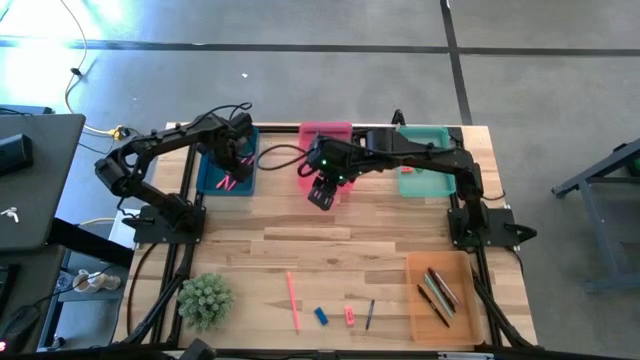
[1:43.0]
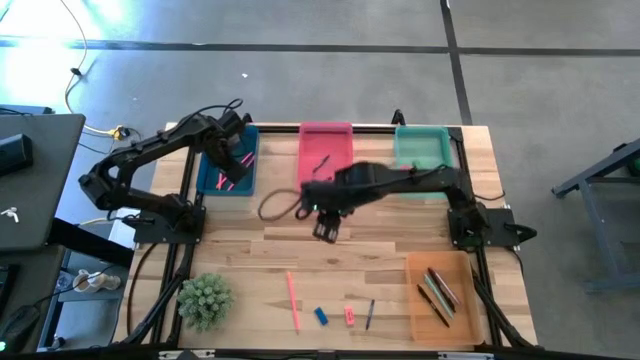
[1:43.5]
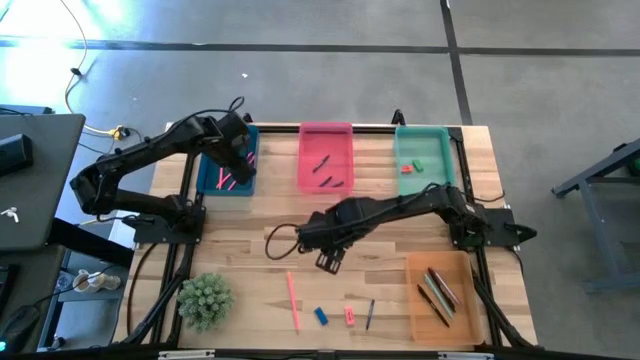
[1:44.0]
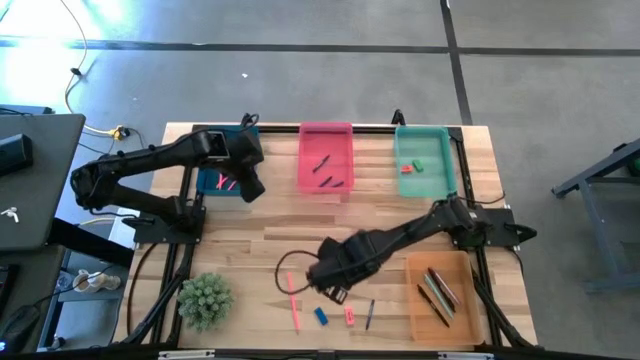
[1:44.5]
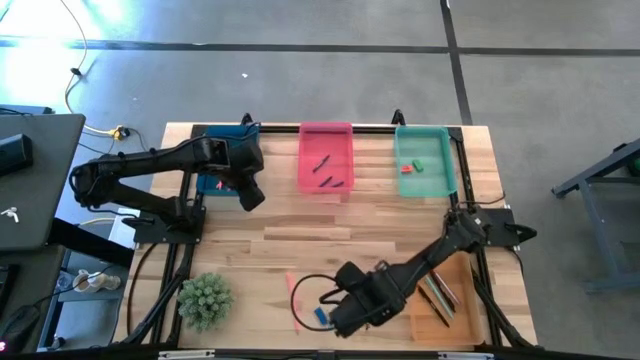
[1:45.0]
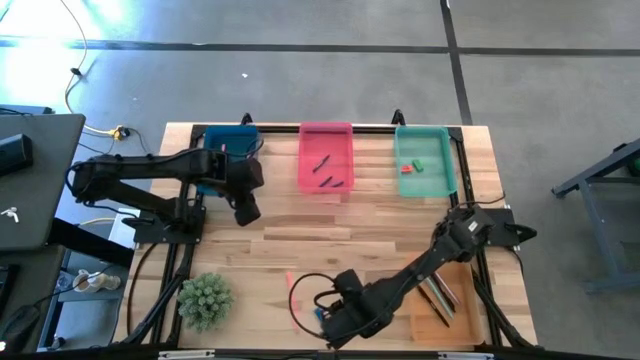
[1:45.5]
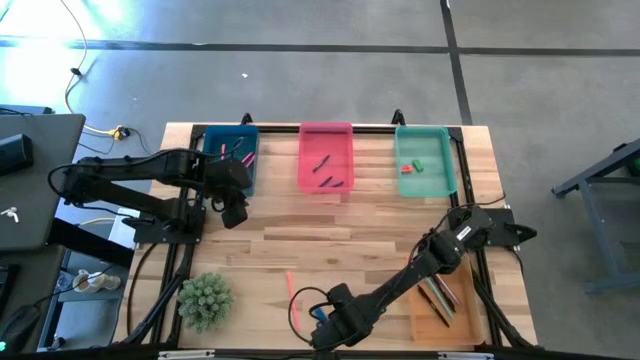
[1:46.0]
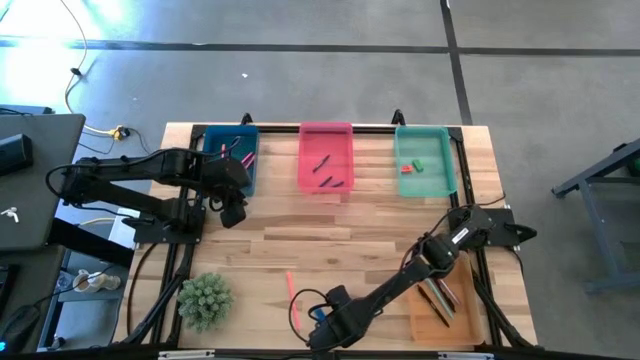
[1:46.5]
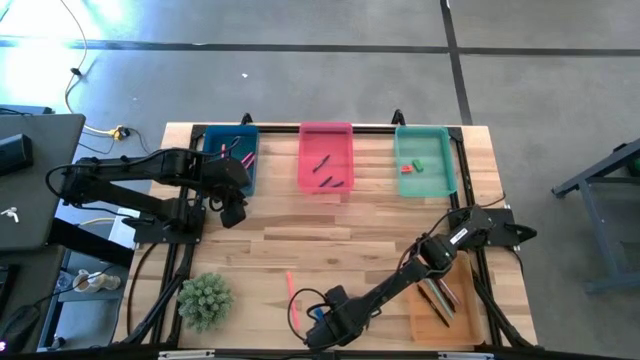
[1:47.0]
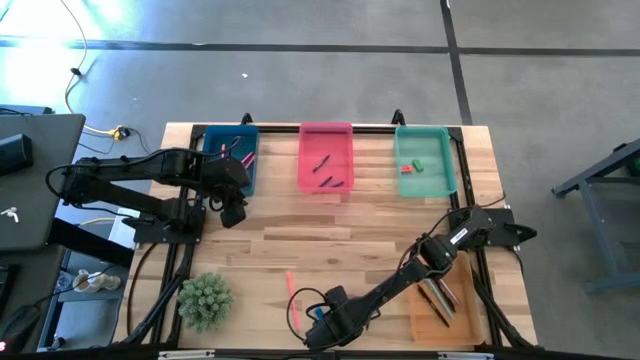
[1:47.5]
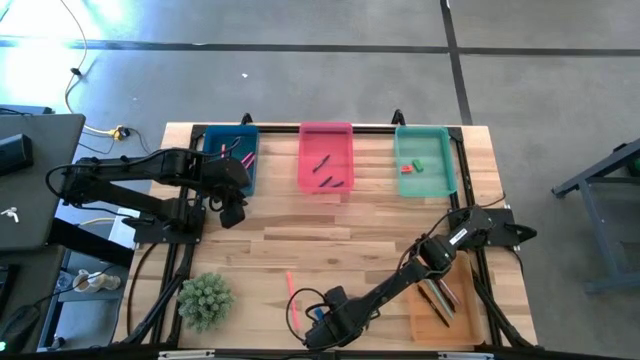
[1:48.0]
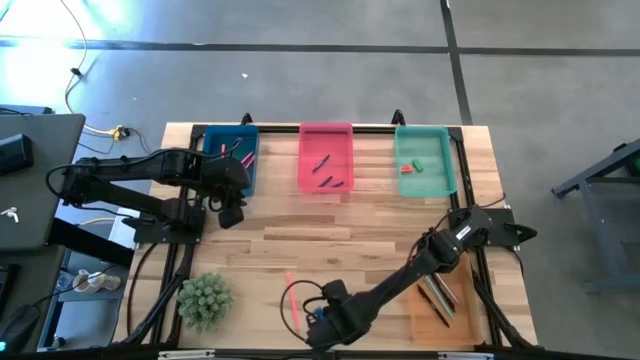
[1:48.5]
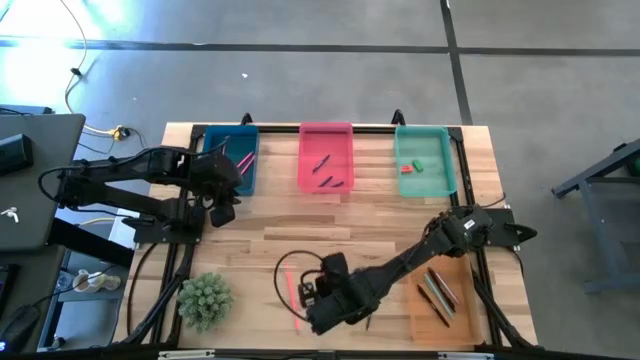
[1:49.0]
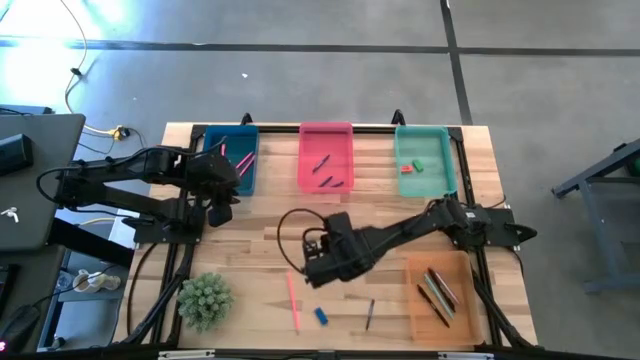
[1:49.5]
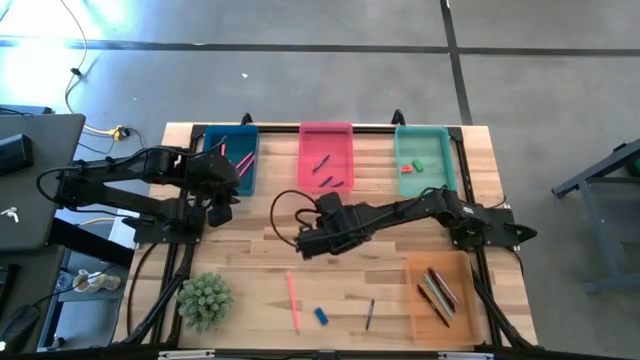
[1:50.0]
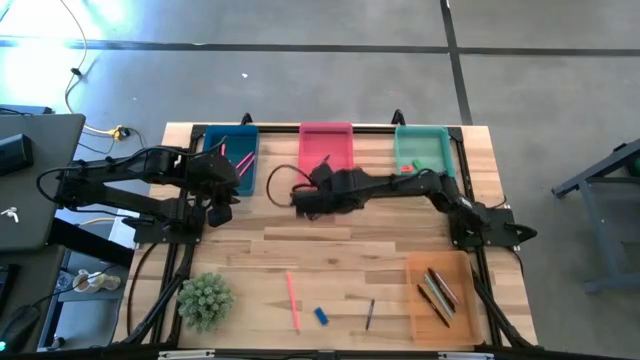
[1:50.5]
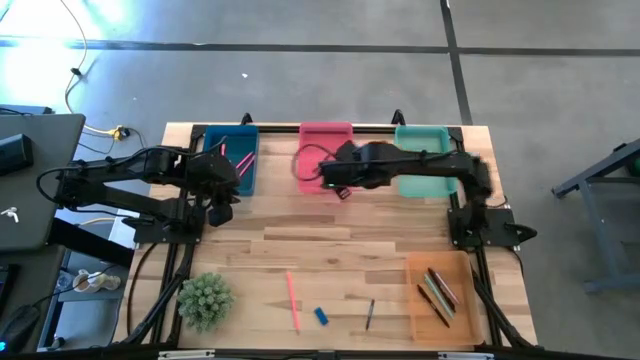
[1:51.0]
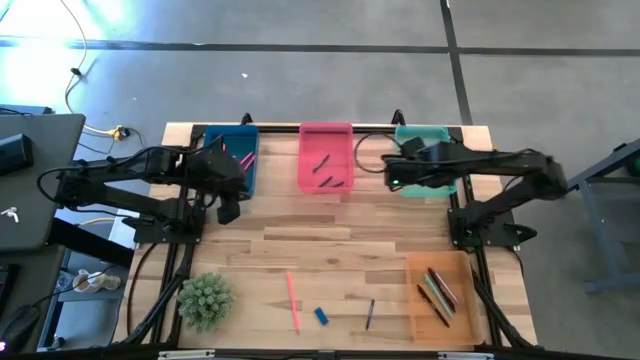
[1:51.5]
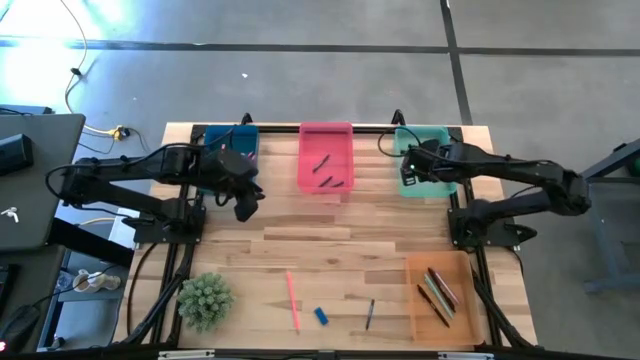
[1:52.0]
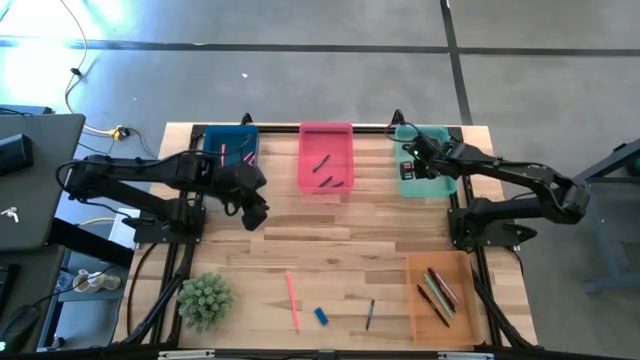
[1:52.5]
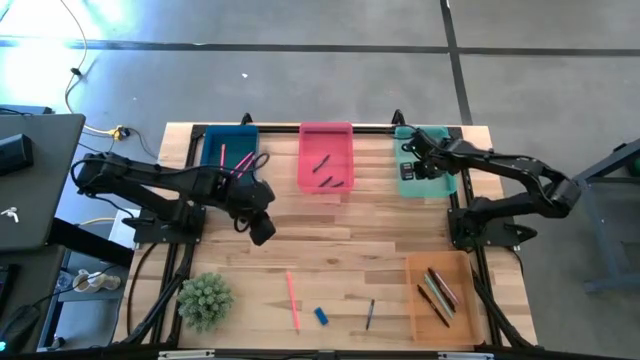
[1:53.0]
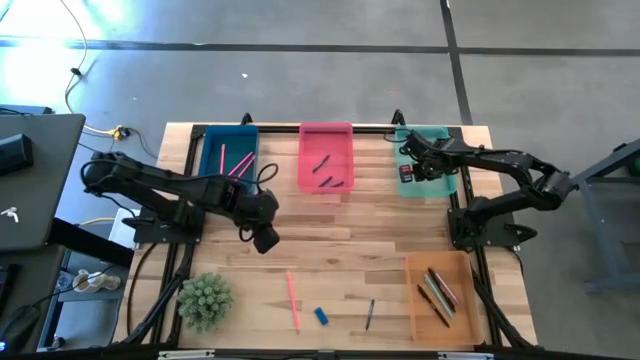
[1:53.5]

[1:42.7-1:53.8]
Task: Sort crayons/erasers/pens/pencils in bins
Put the pink eraser into the green bin

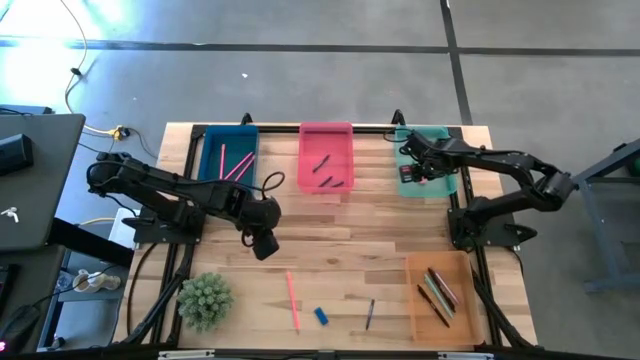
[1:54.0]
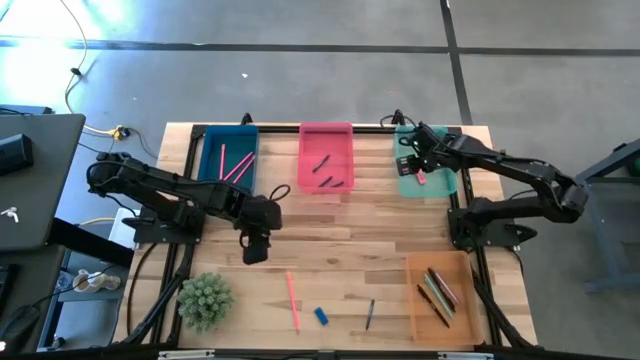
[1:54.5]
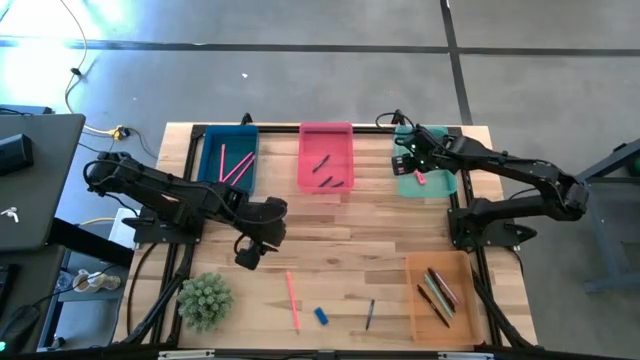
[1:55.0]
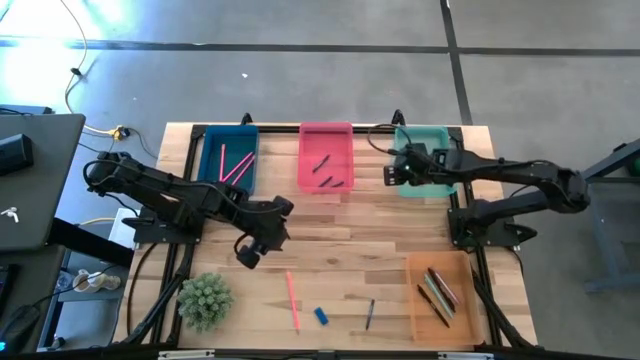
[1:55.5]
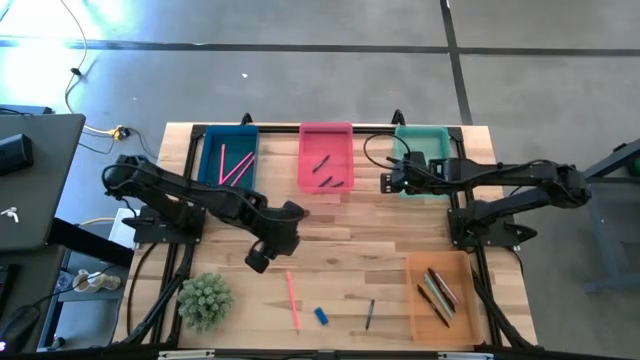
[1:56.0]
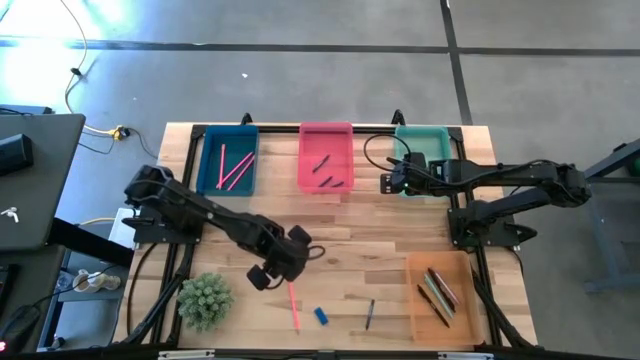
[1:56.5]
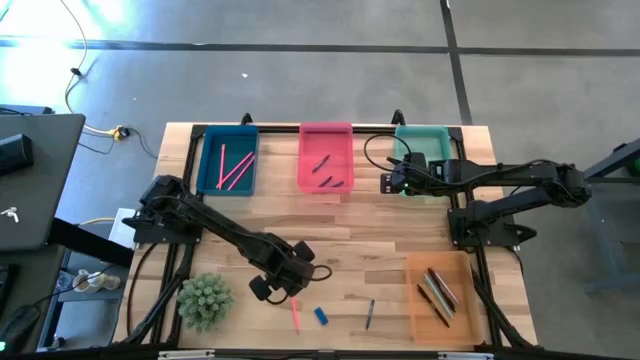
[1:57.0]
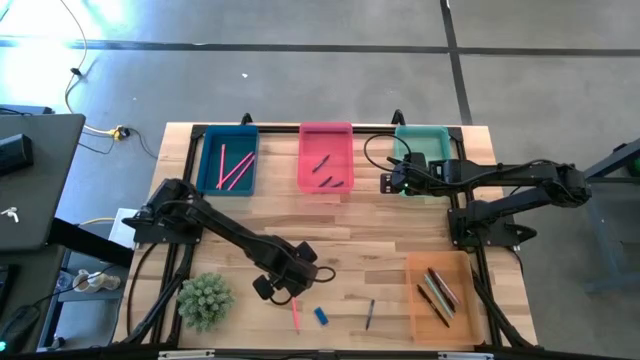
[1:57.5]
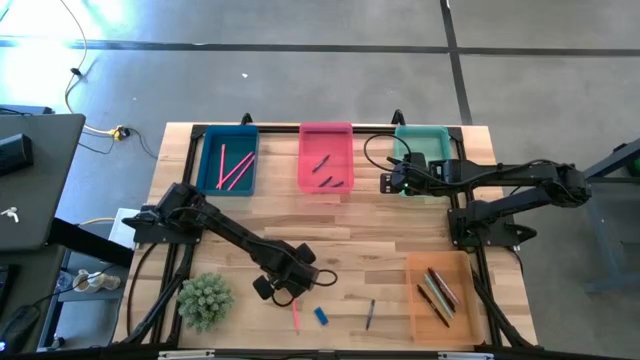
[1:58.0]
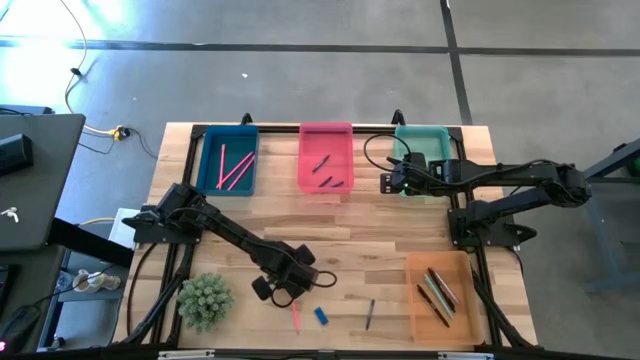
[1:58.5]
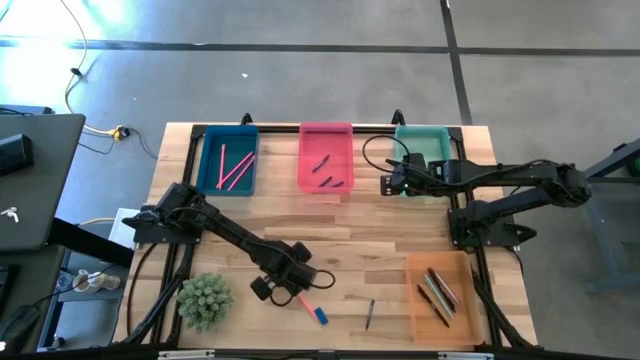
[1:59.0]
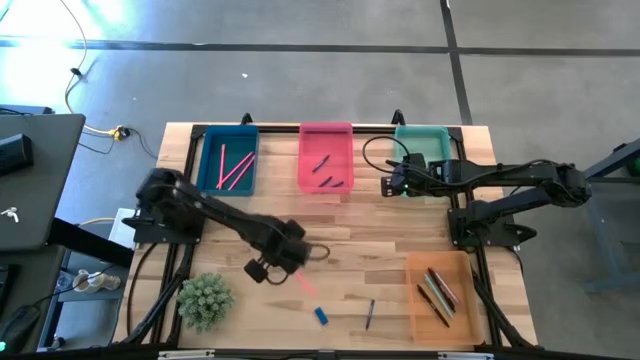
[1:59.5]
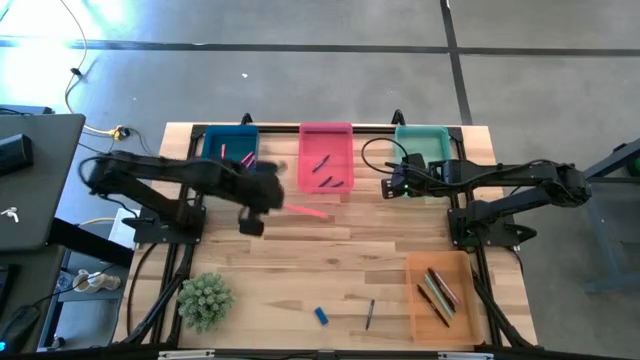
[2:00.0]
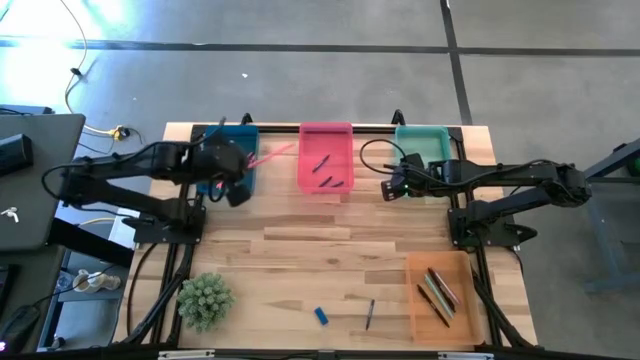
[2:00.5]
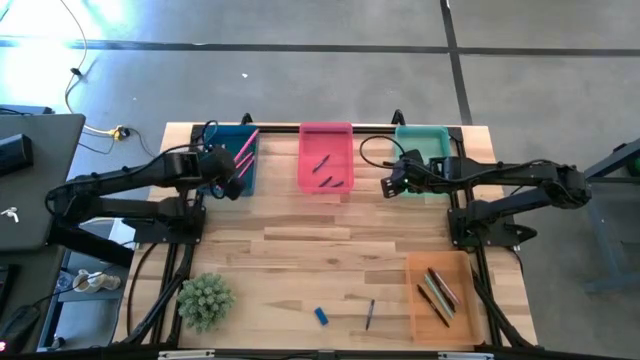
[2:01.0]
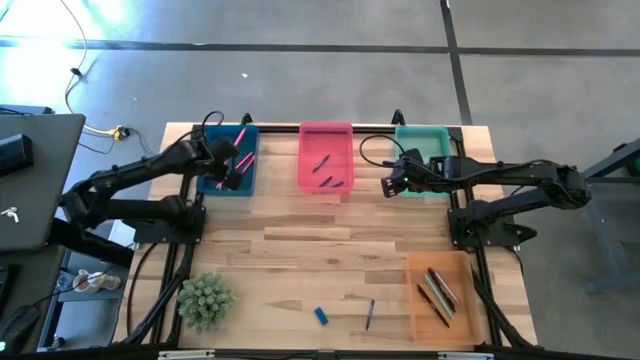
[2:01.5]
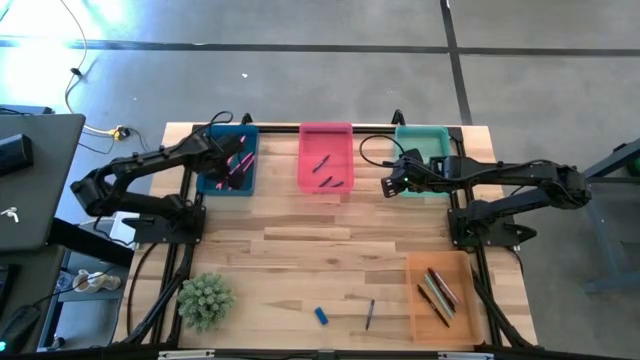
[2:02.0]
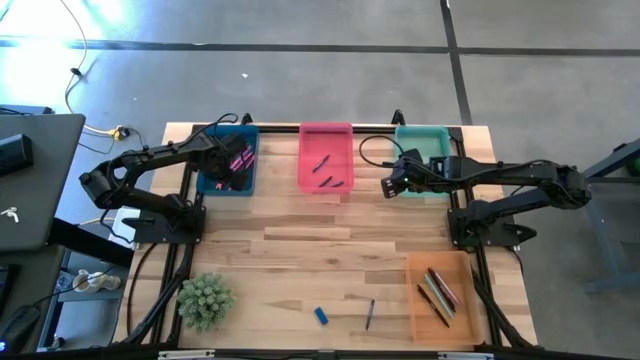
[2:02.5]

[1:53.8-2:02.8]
Put the pink pencil into the blue bin

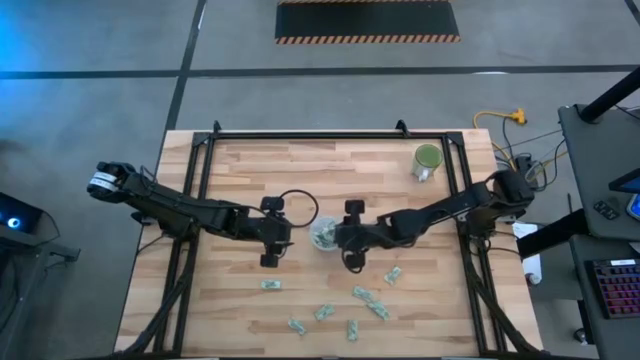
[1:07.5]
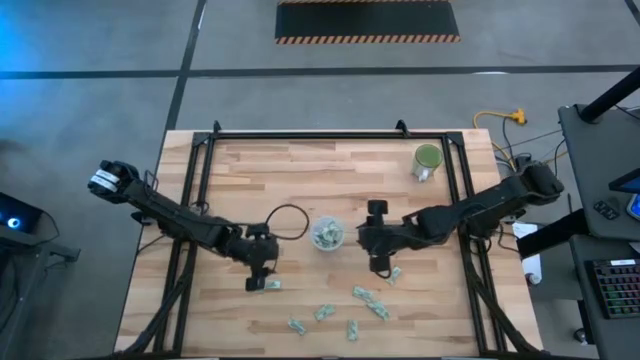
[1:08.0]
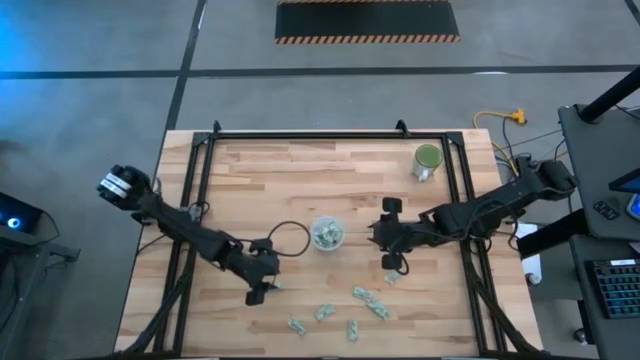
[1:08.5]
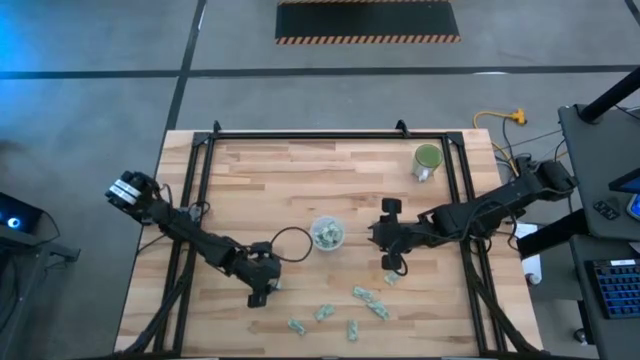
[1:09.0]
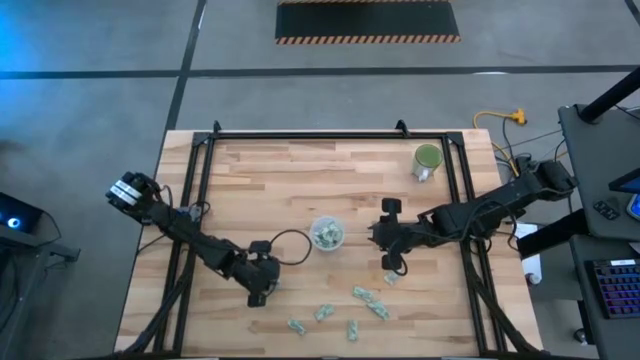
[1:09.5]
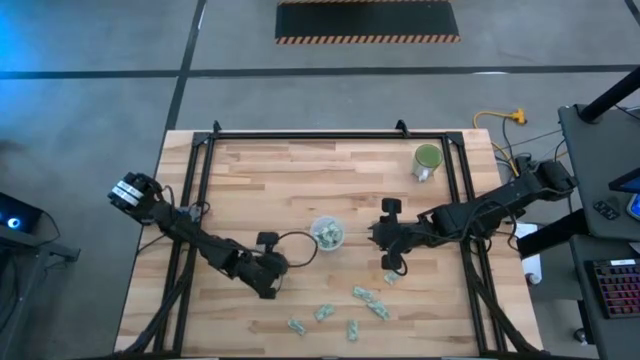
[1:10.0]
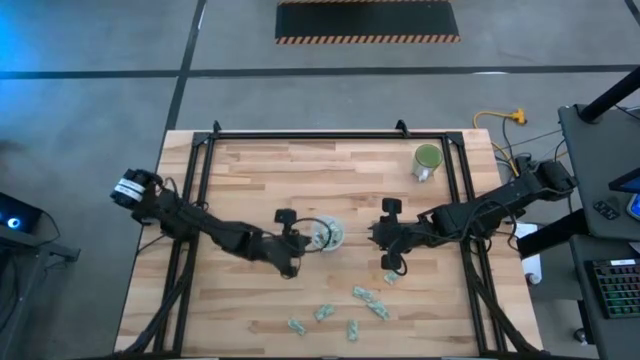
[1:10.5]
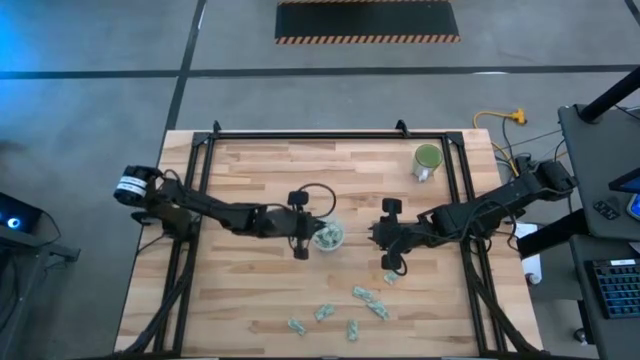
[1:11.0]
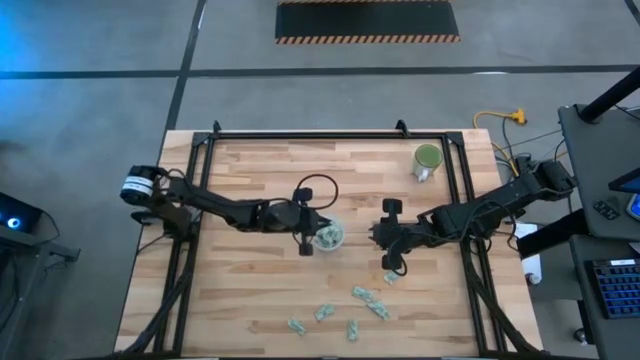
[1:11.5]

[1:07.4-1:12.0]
Task: Pick and place Stevia / Truvia into bins
Put the light green stevia packet into the transparent container
